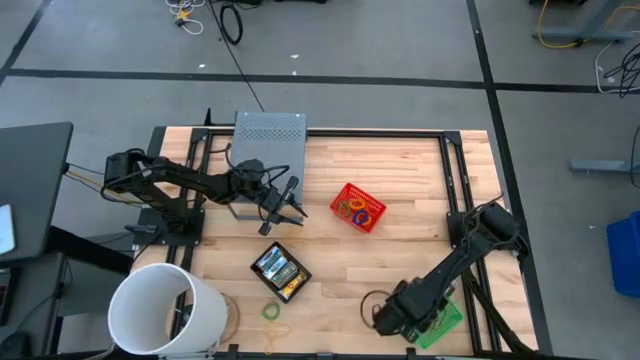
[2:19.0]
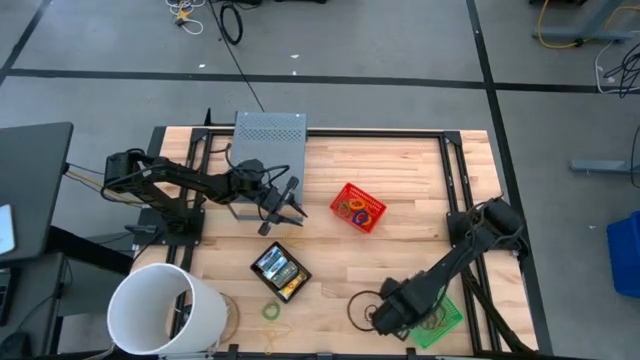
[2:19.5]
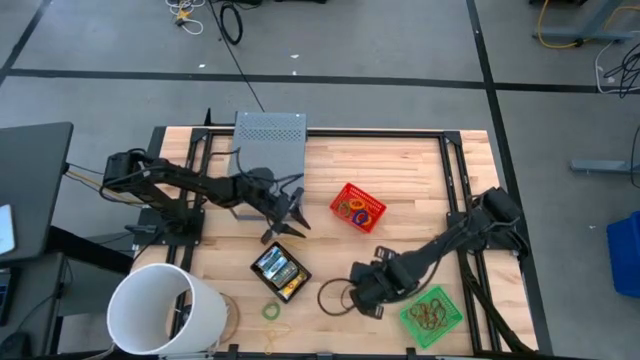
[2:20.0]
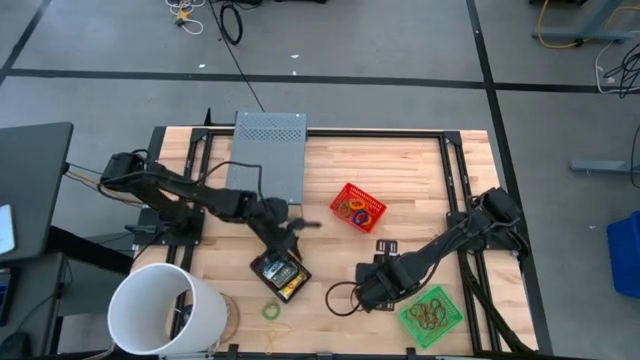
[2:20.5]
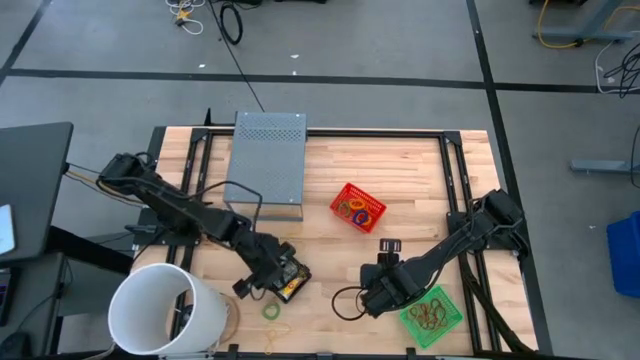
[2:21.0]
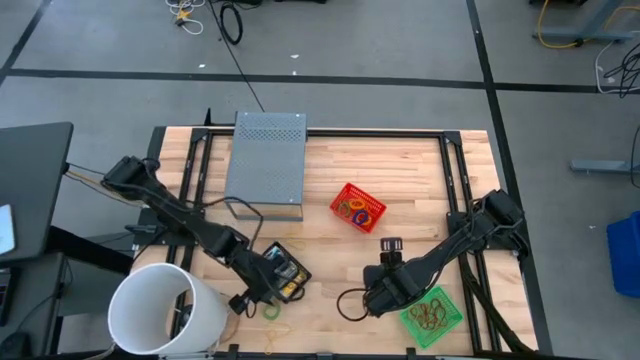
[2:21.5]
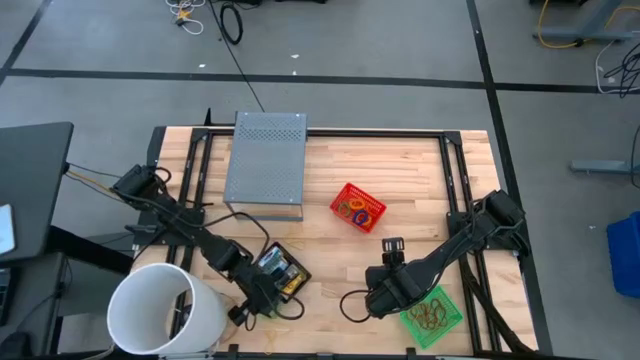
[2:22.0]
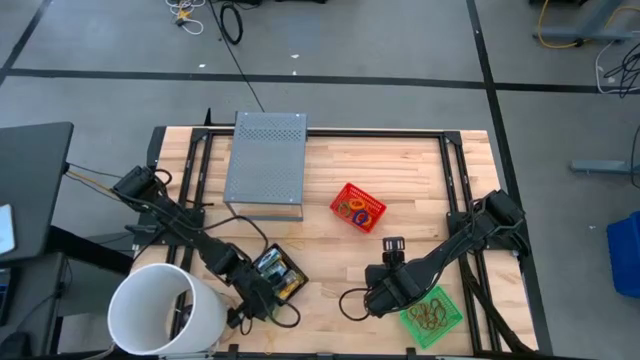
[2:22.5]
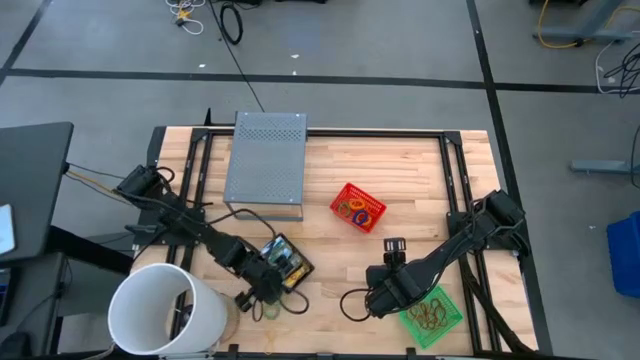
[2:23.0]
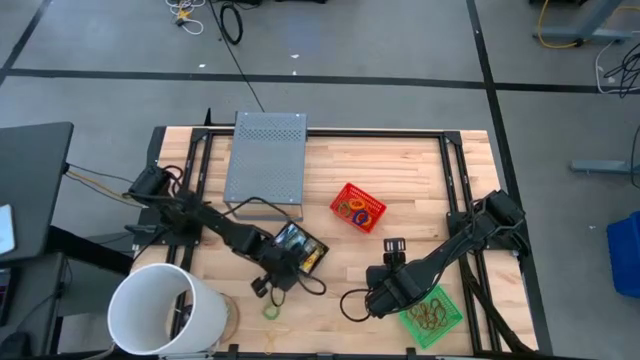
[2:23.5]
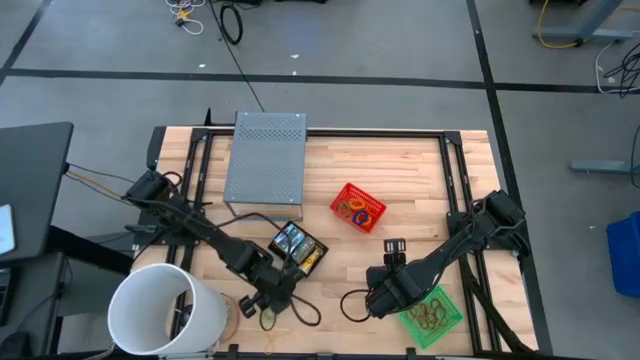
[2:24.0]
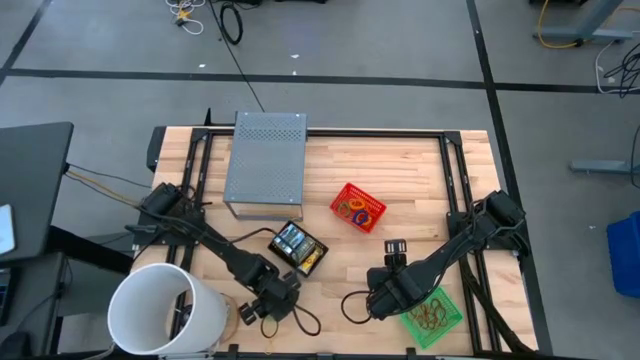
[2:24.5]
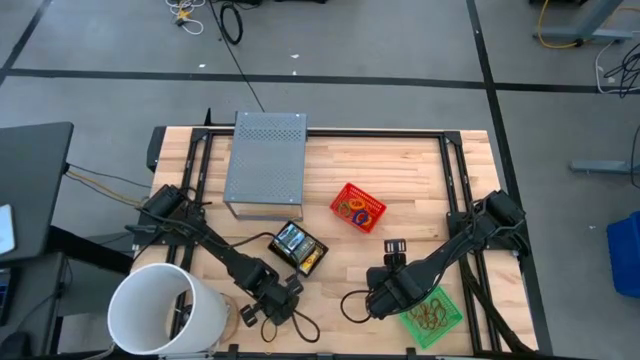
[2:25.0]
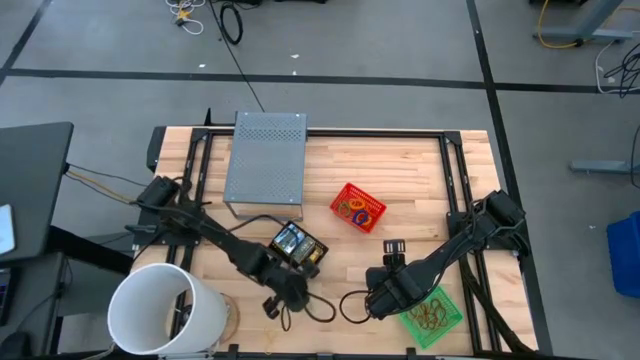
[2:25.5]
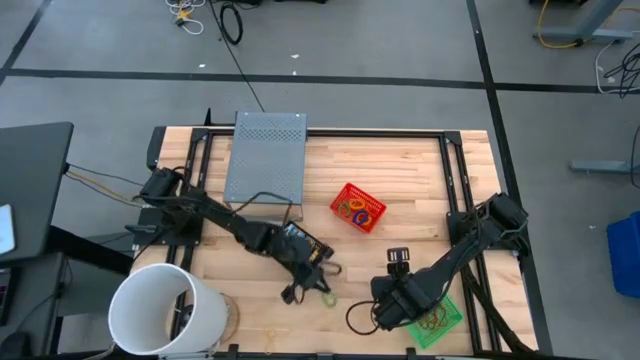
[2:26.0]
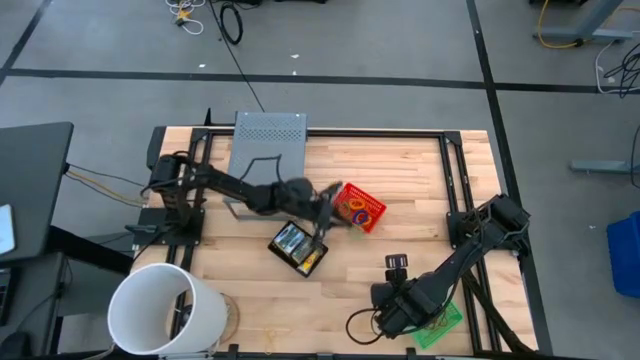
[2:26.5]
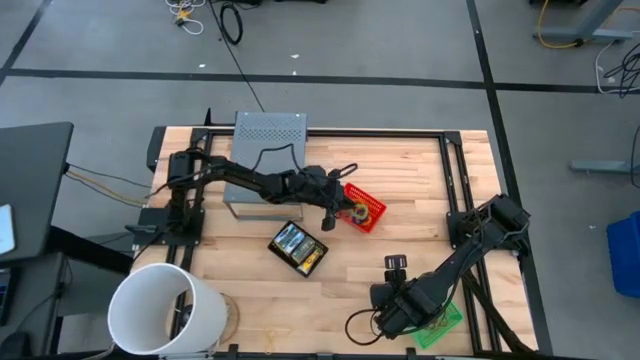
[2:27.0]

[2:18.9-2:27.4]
Task: Pick & Place Office Desk Supplies
Put the green spring keychain into the red basket

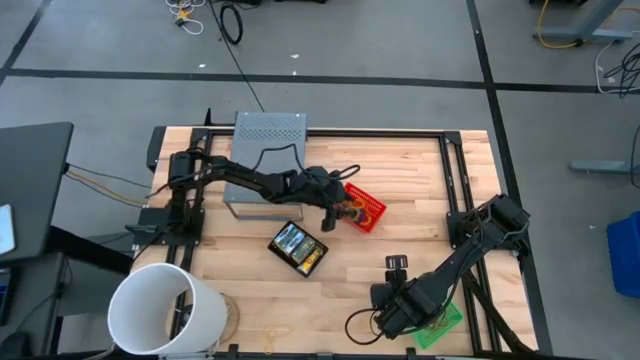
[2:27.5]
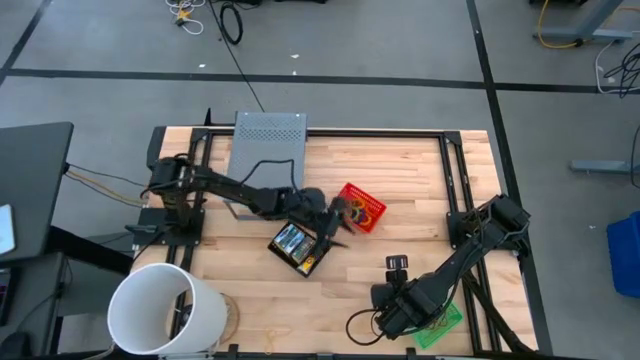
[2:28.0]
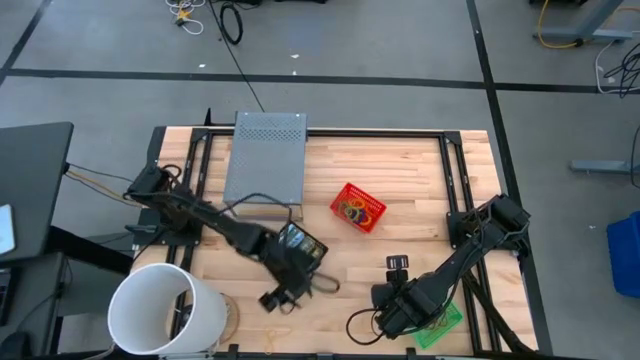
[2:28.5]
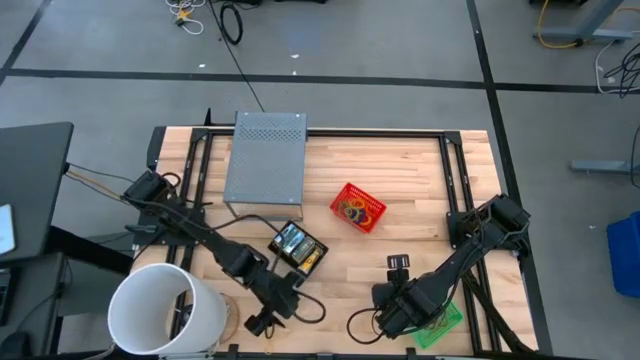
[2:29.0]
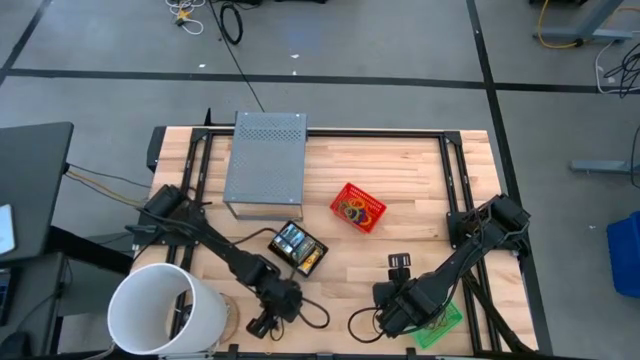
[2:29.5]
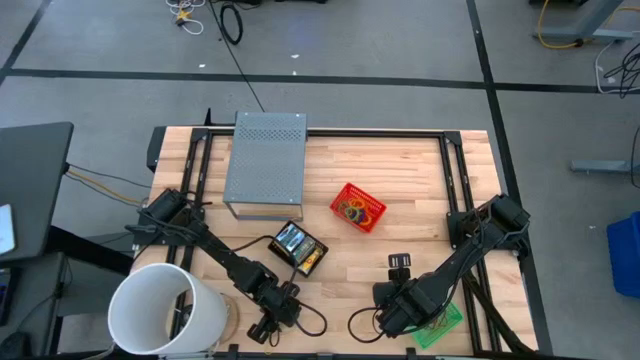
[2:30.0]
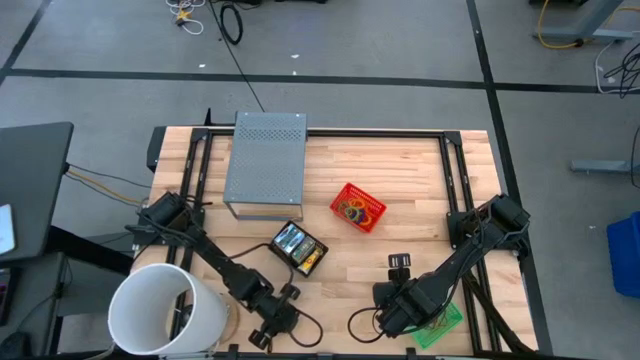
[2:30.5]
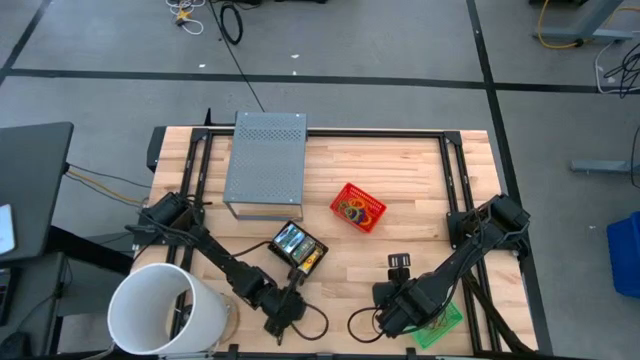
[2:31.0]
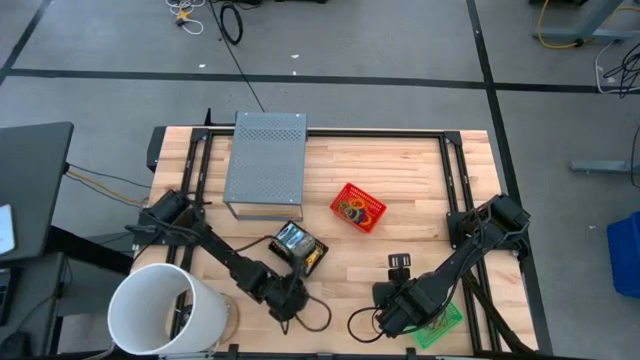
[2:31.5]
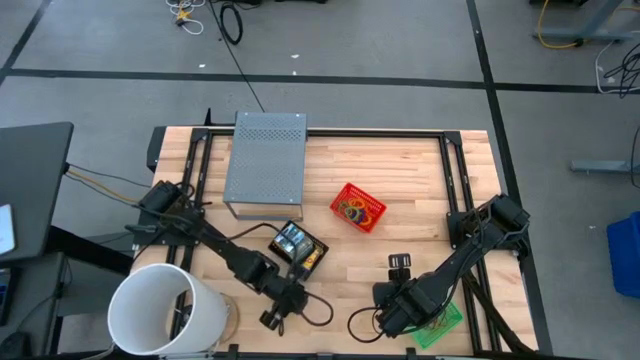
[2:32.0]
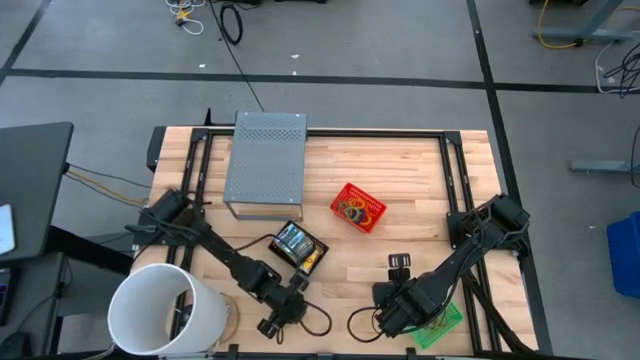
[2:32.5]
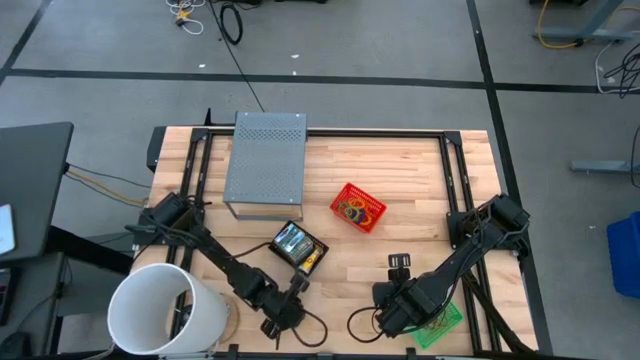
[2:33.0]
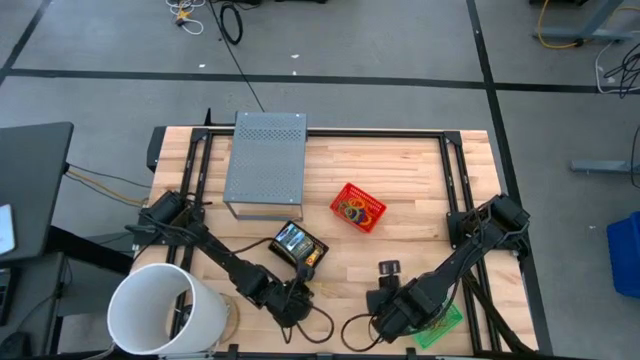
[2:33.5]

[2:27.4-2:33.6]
Put the bottom yellow rubber band into the green basket

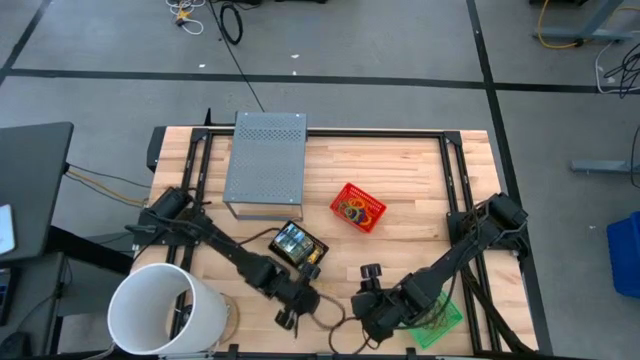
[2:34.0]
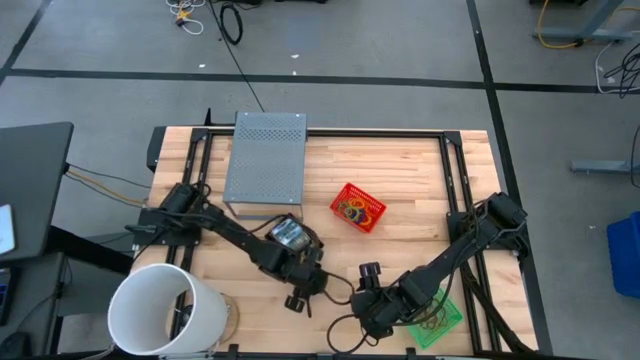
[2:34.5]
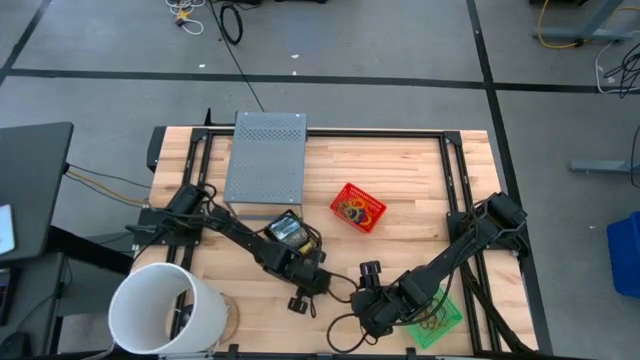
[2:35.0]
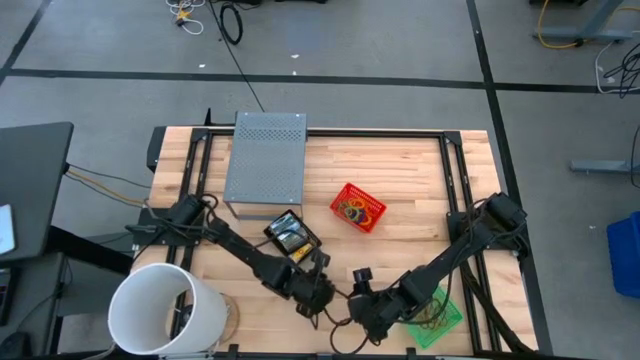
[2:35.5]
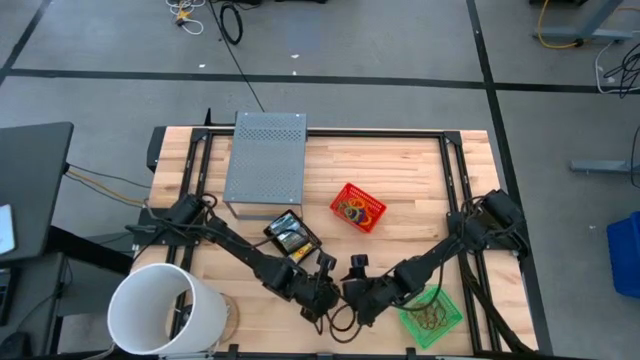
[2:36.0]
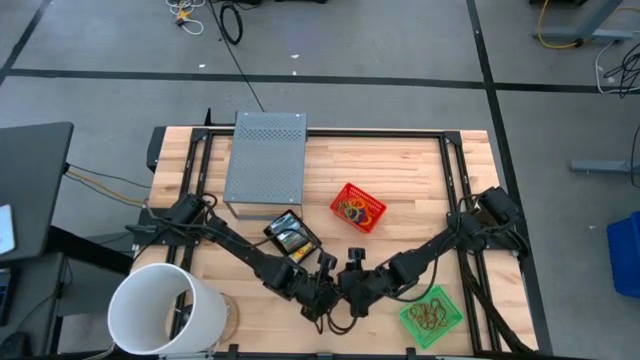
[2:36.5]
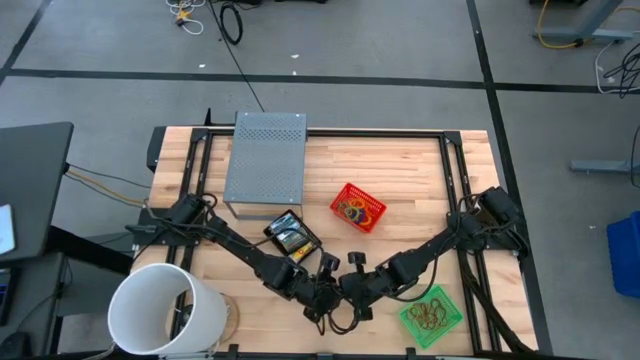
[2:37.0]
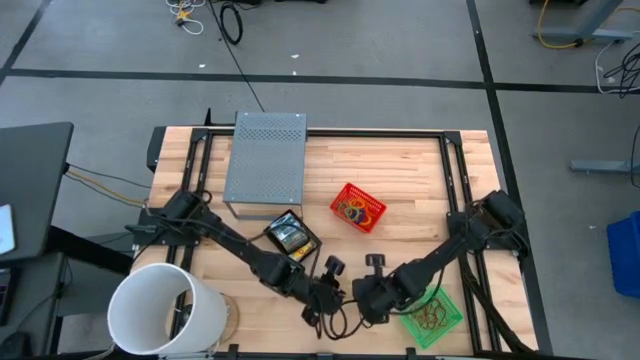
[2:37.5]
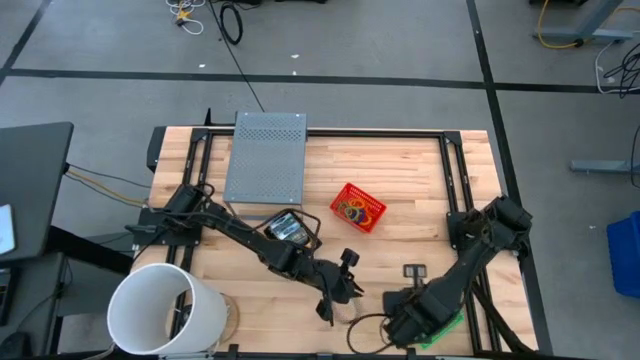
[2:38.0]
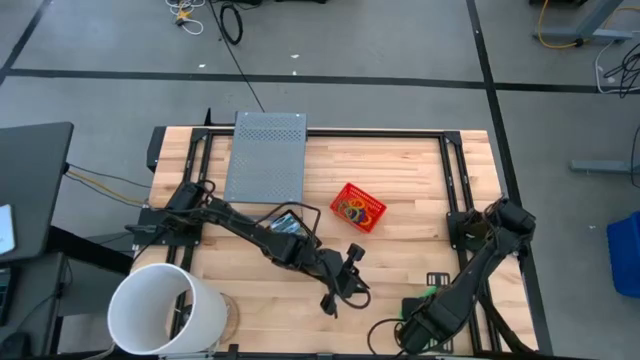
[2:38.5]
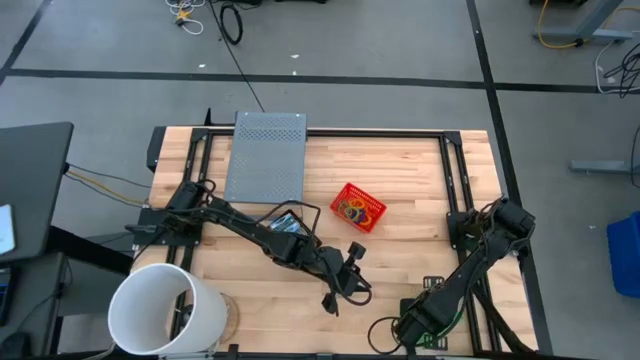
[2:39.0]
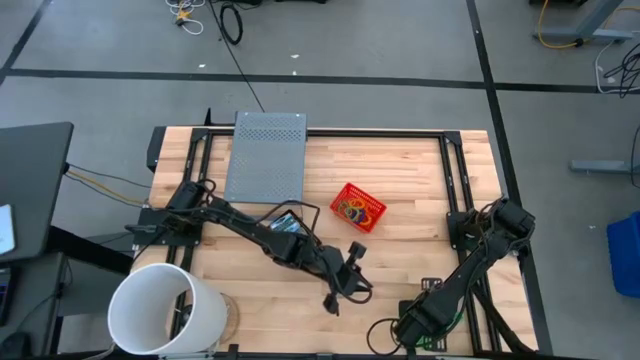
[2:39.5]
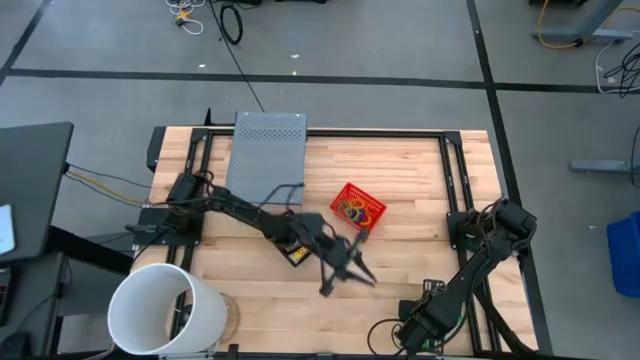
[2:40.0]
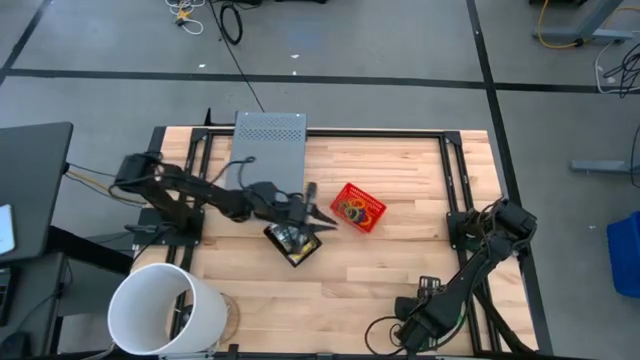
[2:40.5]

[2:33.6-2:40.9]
Put the bottom yellow rubber band into the green basket
